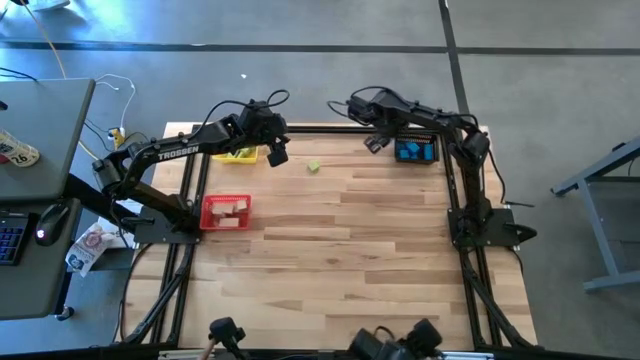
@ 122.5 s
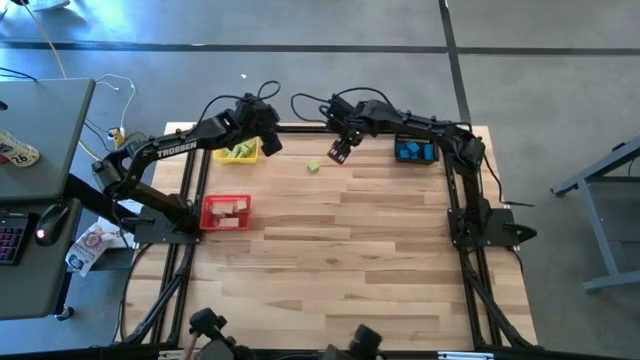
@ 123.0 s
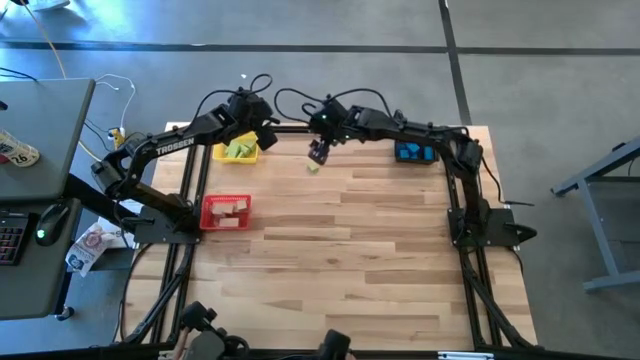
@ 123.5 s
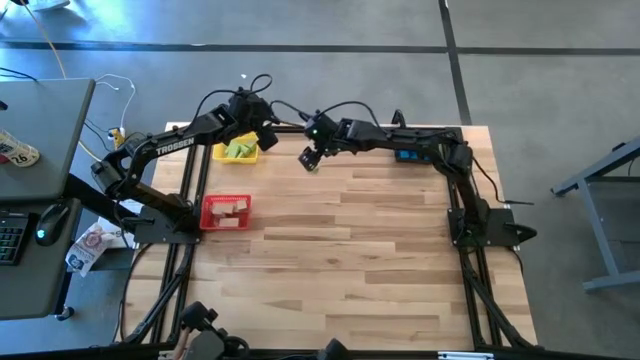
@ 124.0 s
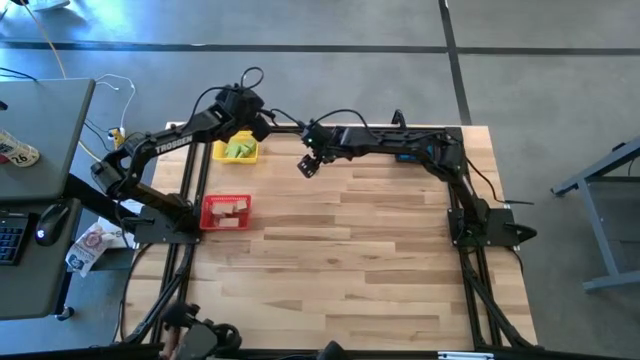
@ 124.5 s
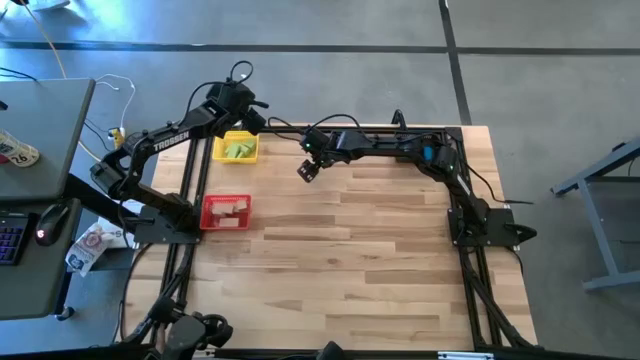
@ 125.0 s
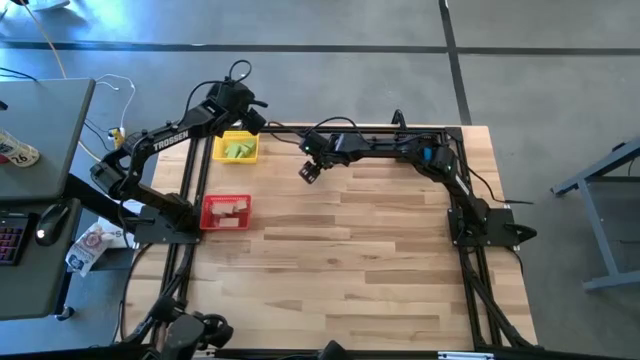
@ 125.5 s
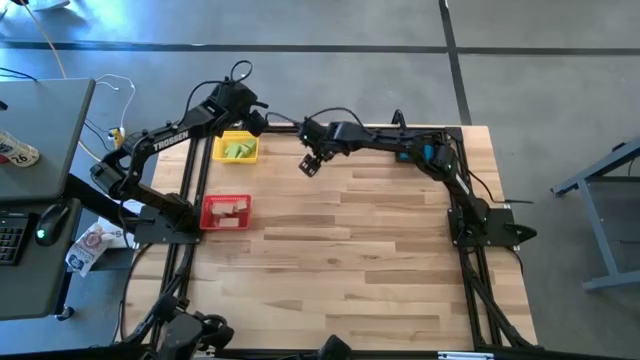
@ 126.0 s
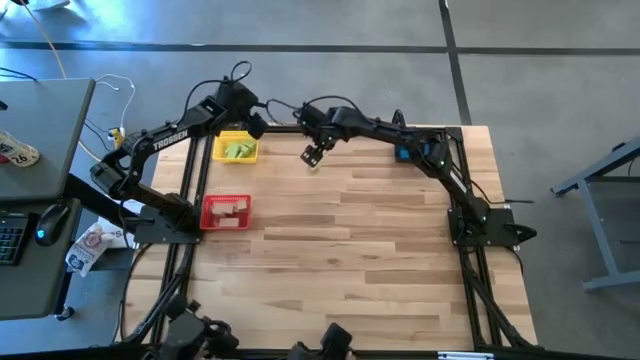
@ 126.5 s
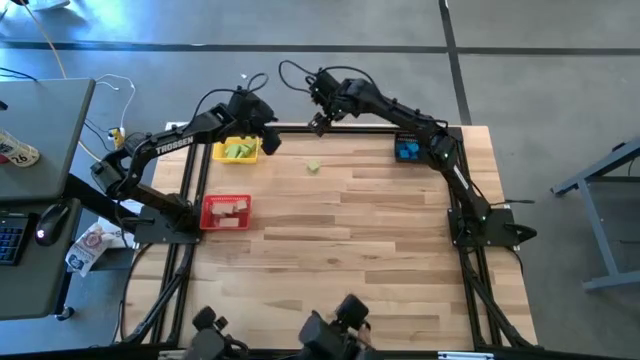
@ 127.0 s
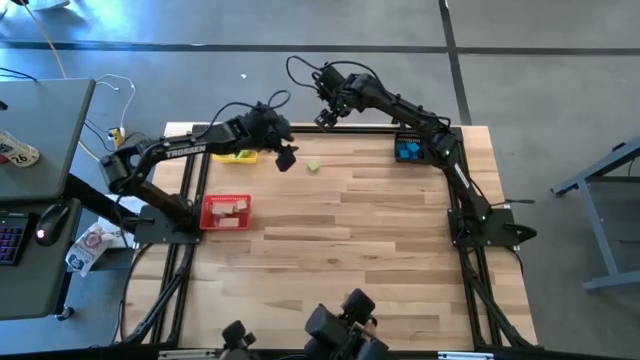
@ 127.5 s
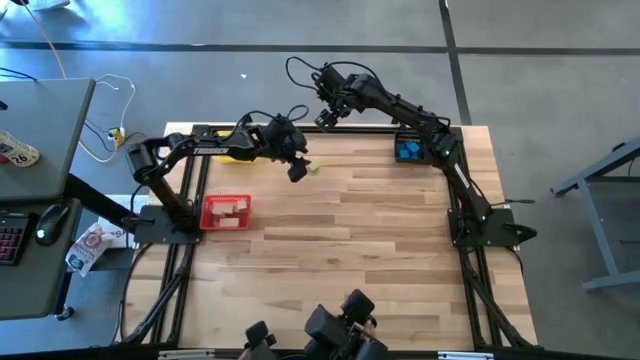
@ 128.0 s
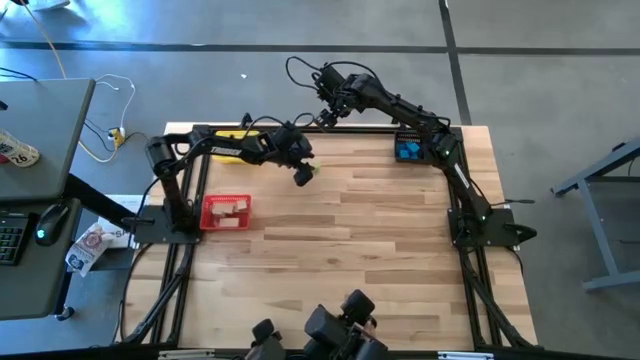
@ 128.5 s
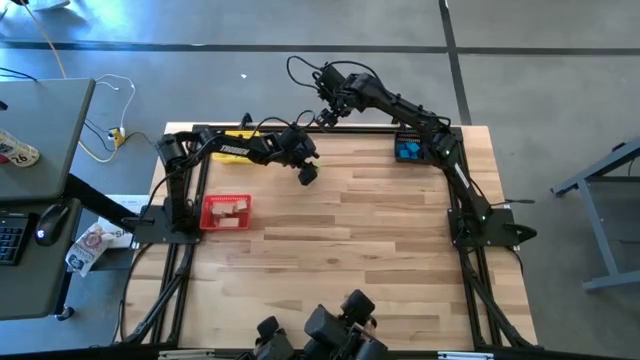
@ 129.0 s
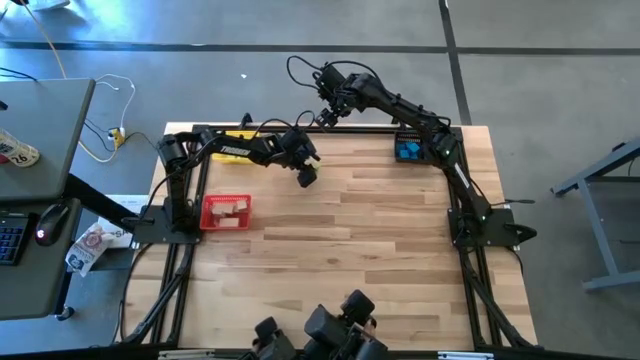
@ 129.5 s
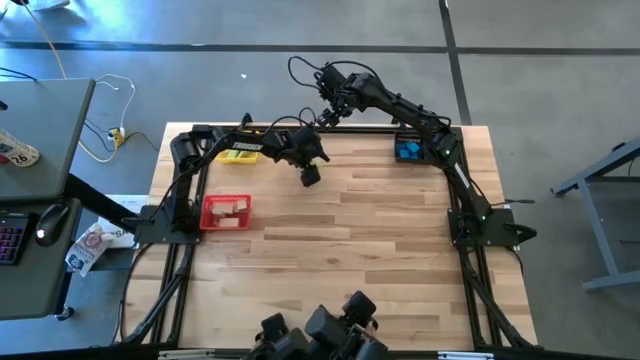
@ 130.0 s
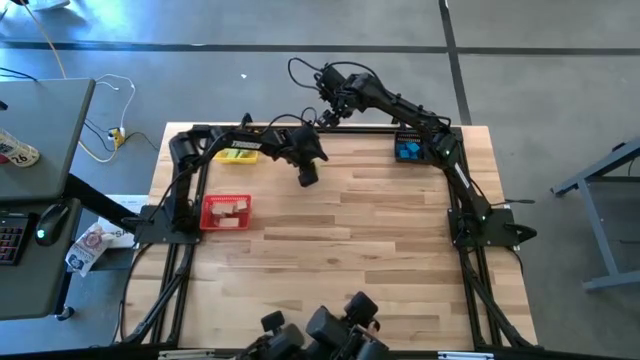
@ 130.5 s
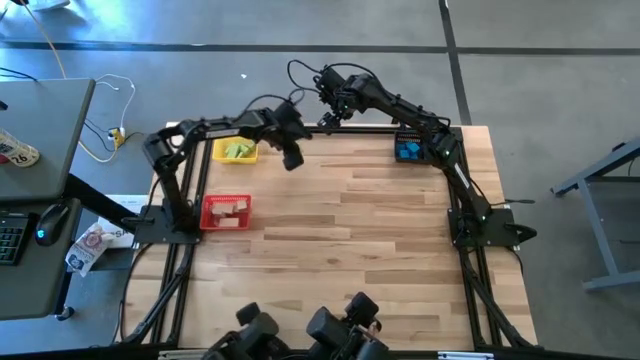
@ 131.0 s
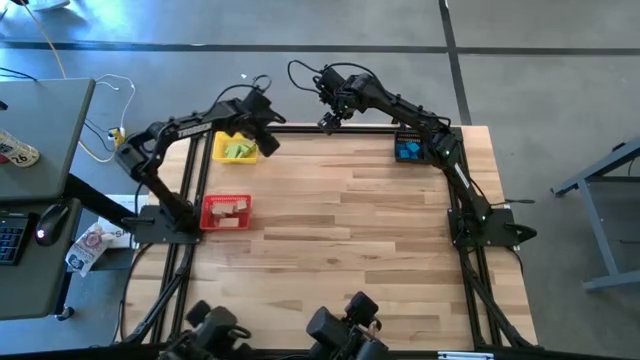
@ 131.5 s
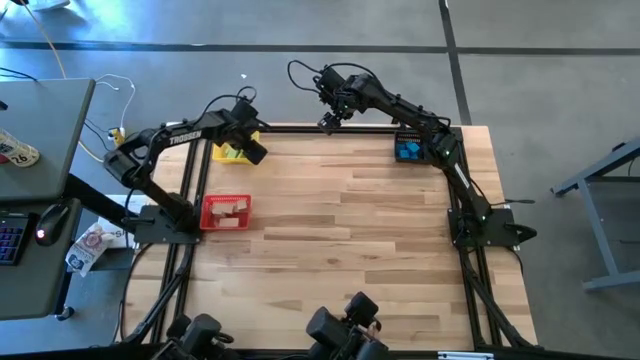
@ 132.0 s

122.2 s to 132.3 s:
Task: Sort & place blocks by color
Put the green block into the yellow bin

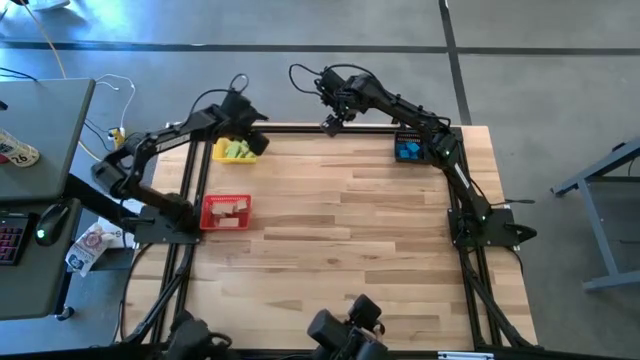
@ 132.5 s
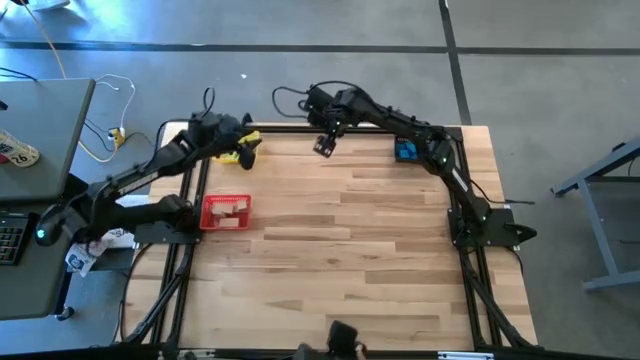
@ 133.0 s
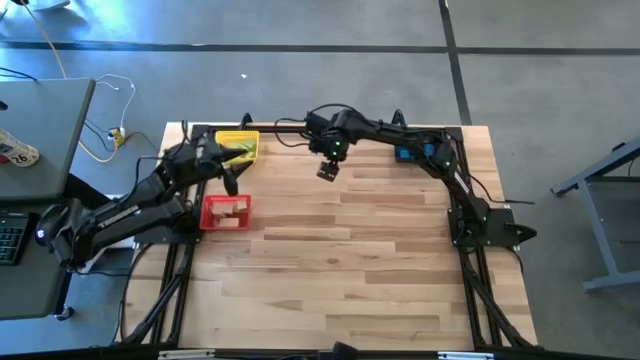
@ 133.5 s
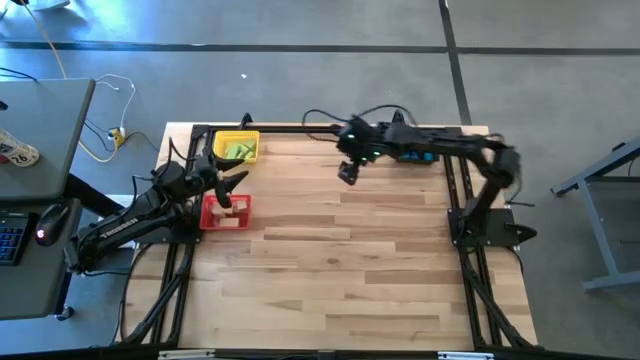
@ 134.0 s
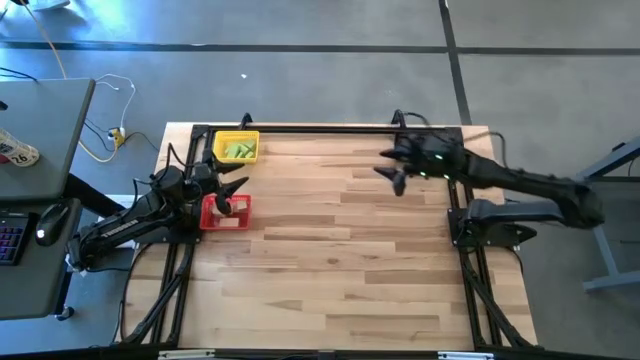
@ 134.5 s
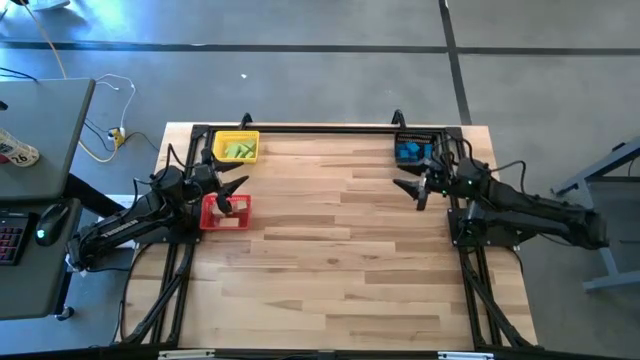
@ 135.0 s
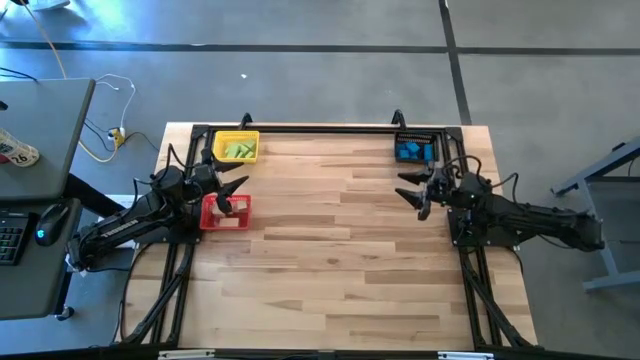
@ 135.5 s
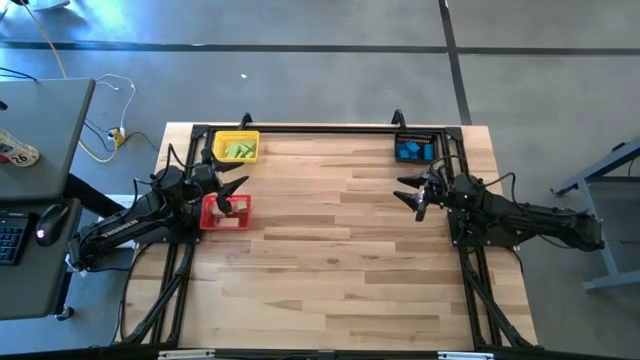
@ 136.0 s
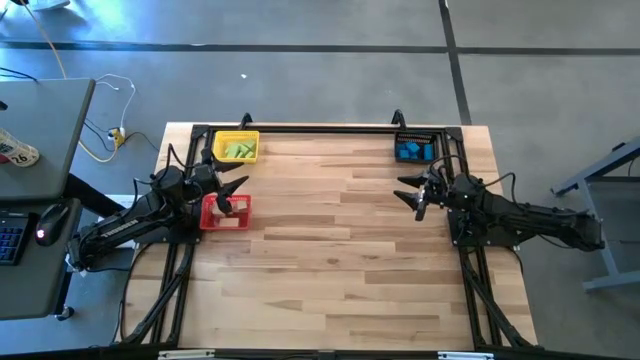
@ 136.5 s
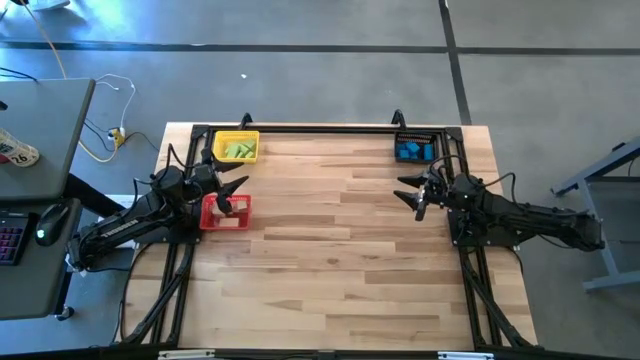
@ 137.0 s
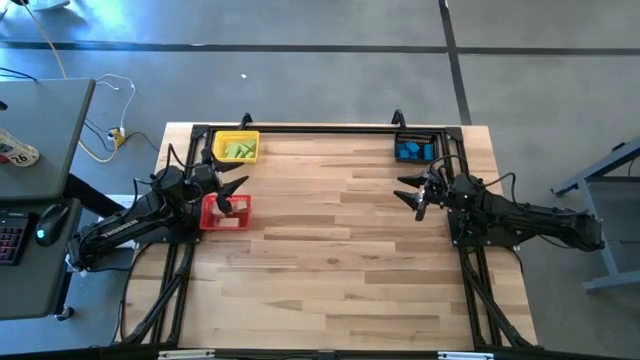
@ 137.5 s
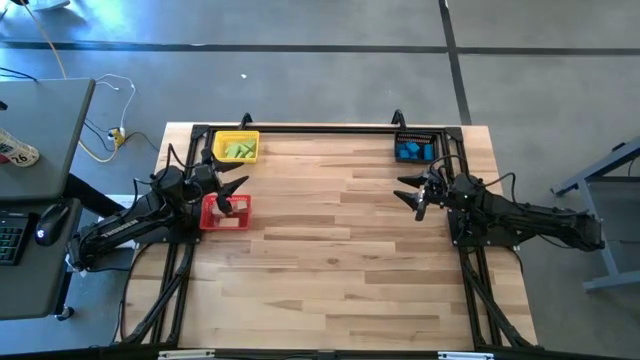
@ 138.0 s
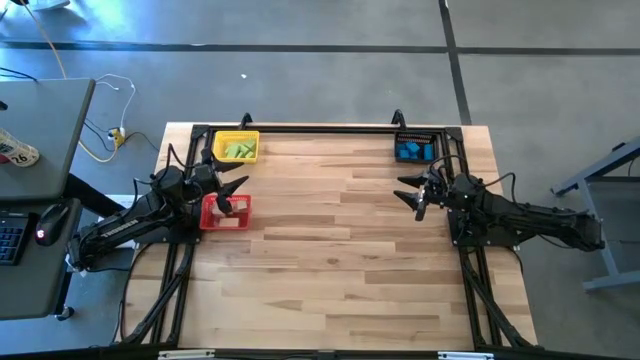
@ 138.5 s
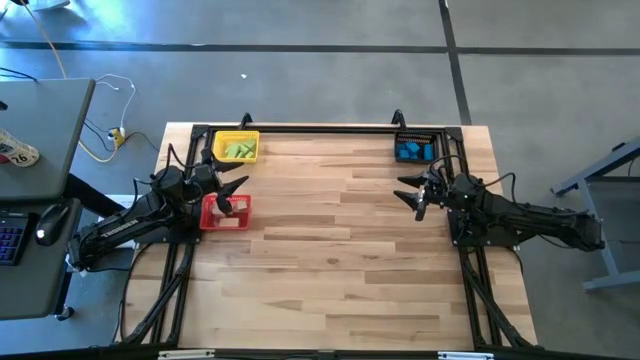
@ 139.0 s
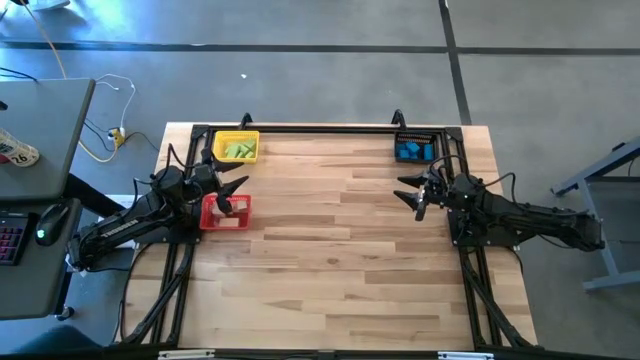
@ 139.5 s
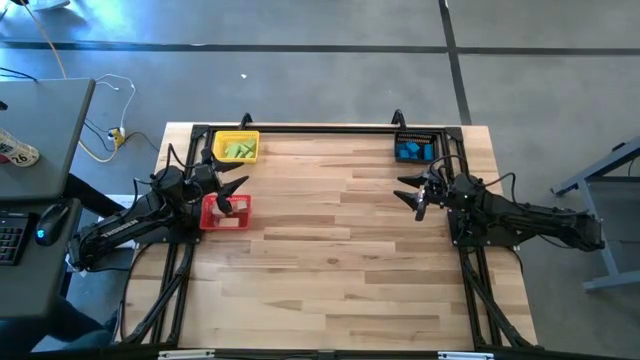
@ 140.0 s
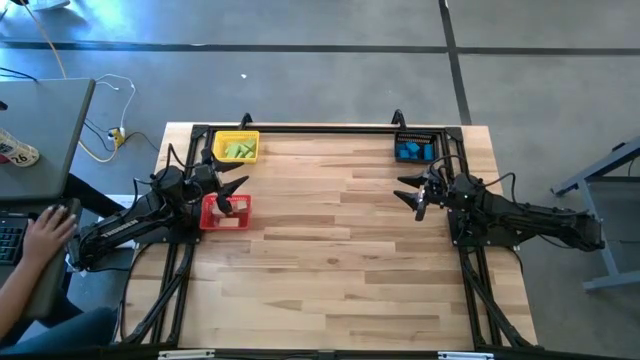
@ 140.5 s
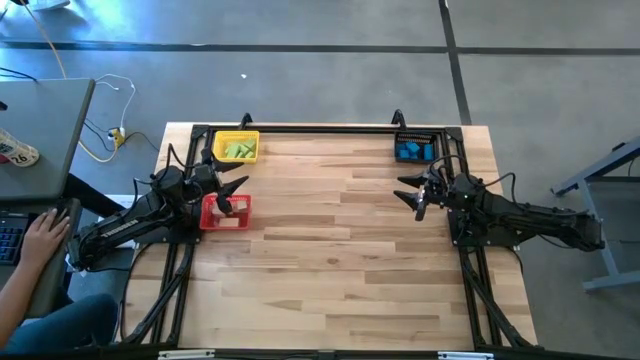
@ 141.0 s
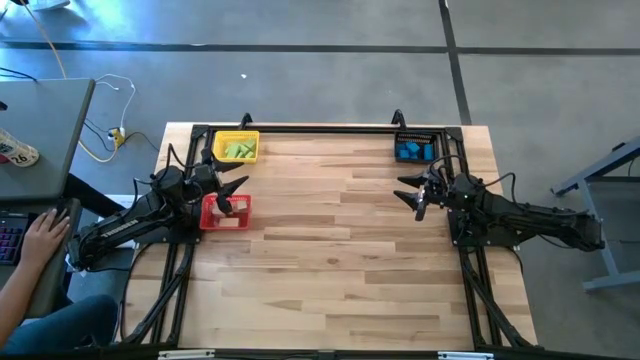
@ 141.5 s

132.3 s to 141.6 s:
Return to Home Position

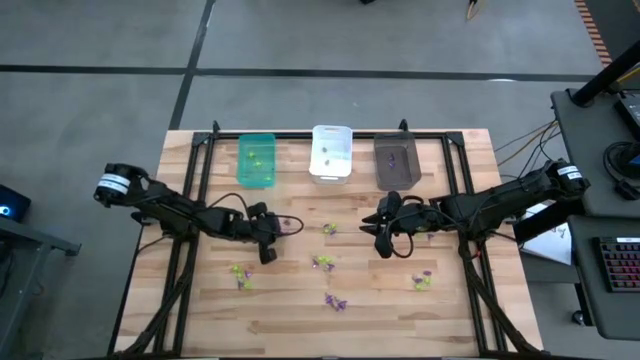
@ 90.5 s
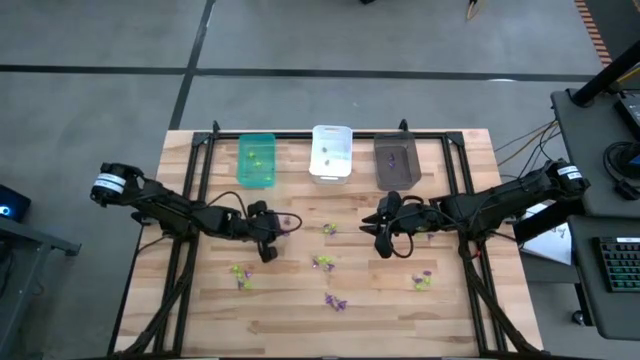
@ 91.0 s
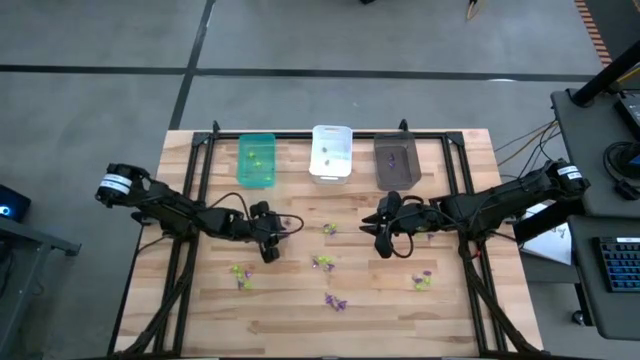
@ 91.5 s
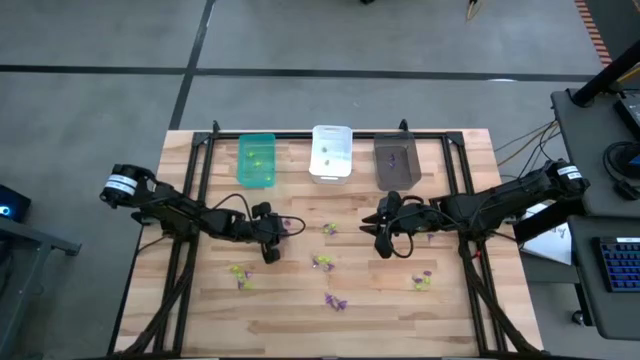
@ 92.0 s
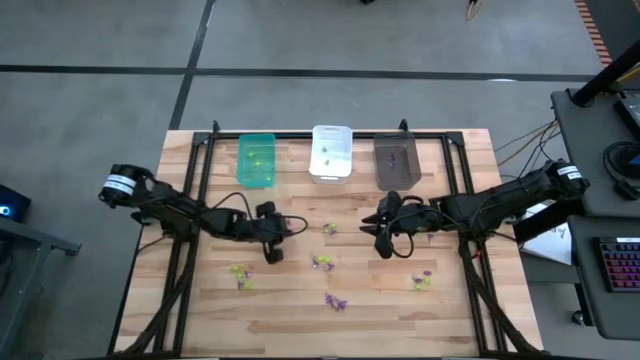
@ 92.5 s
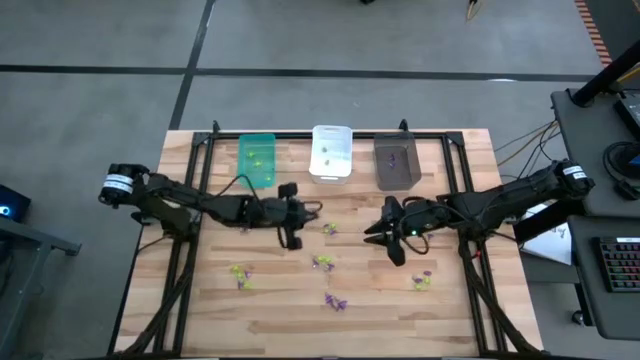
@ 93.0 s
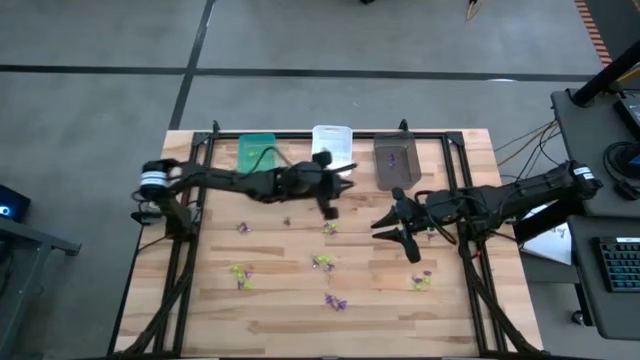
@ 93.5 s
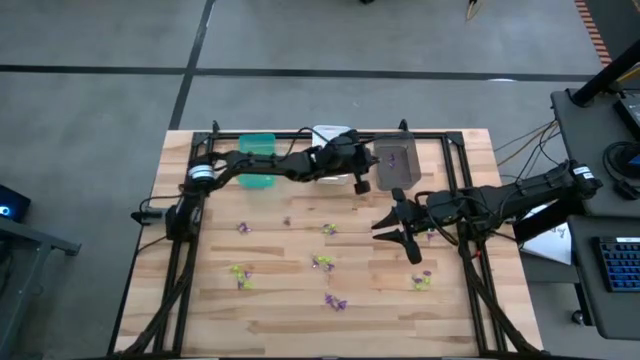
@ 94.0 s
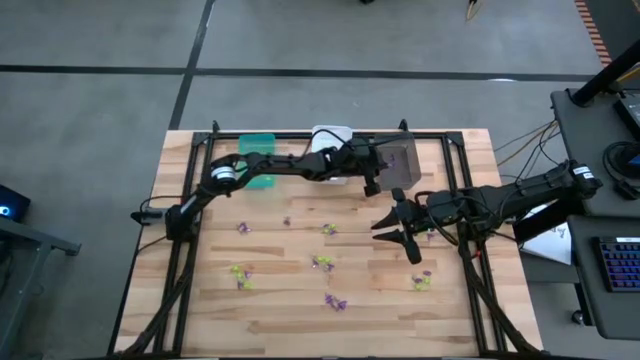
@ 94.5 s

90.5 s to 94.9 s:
Task: Sort Halloween decoration
Put the purple witch hat toy into the gray bin
